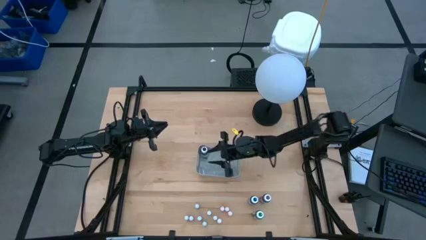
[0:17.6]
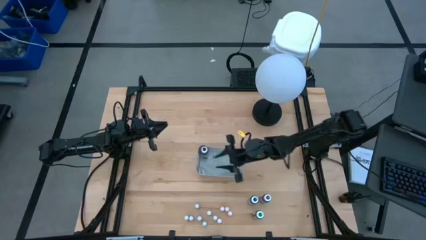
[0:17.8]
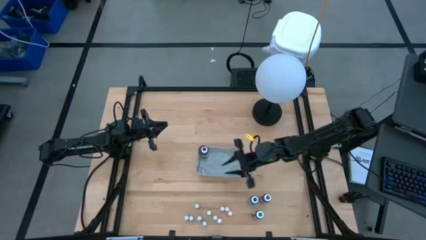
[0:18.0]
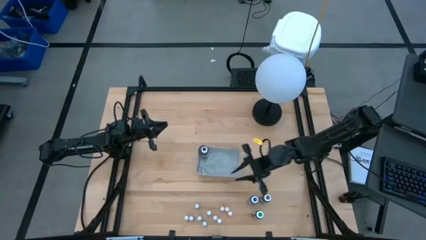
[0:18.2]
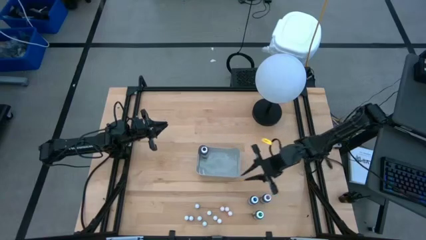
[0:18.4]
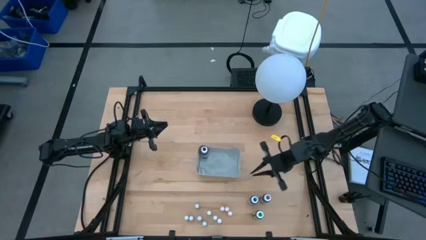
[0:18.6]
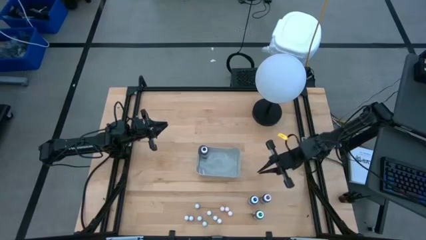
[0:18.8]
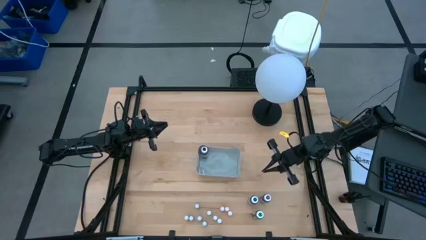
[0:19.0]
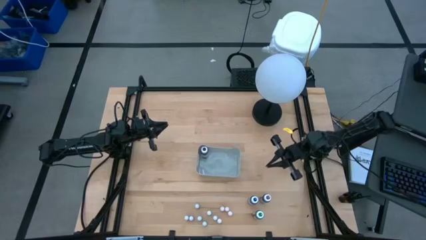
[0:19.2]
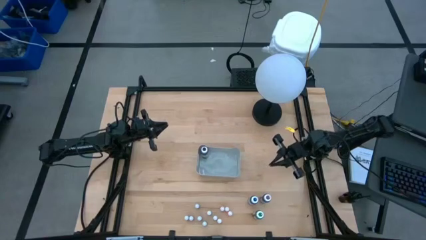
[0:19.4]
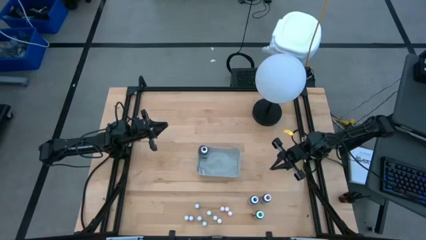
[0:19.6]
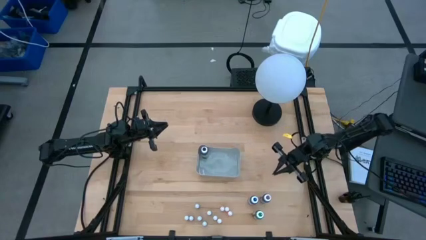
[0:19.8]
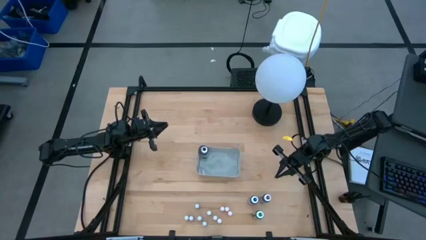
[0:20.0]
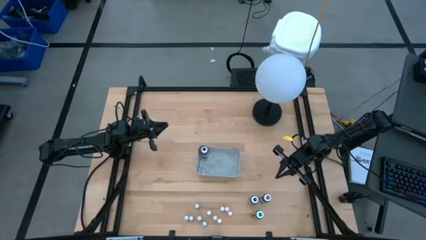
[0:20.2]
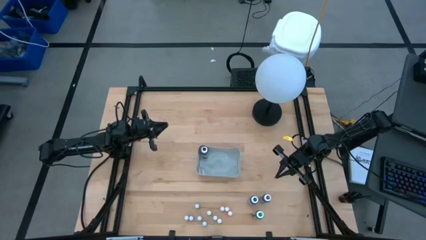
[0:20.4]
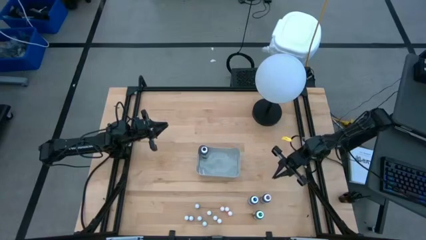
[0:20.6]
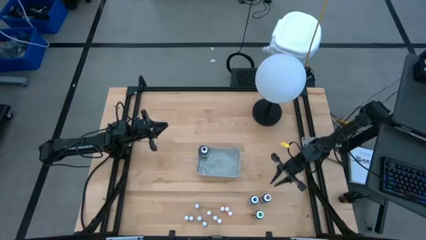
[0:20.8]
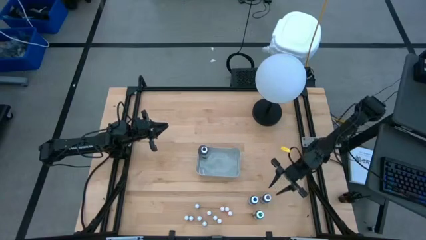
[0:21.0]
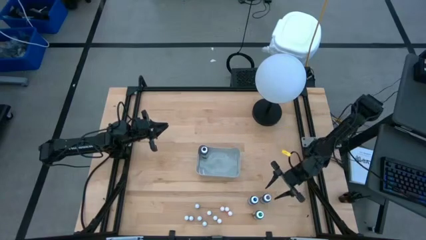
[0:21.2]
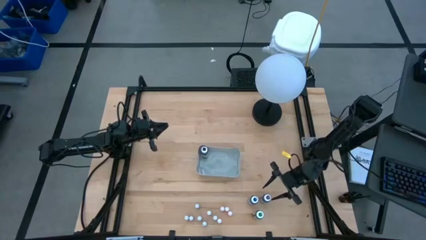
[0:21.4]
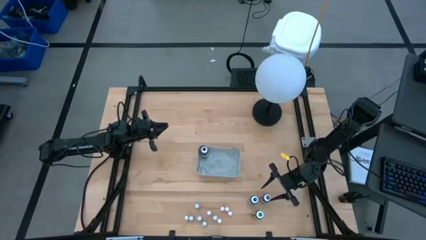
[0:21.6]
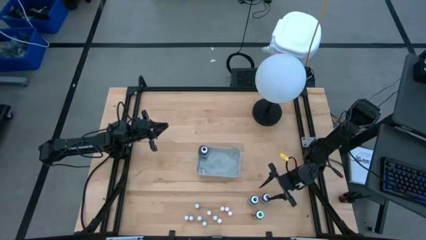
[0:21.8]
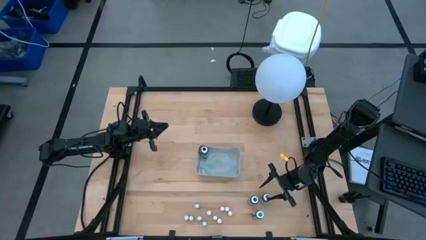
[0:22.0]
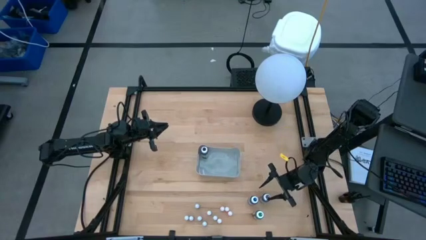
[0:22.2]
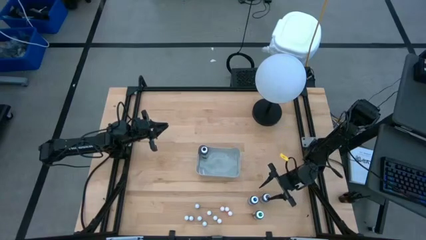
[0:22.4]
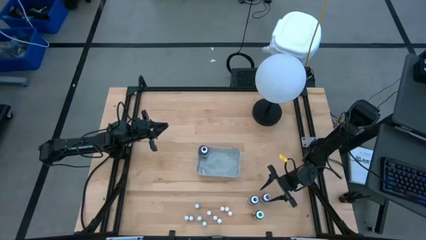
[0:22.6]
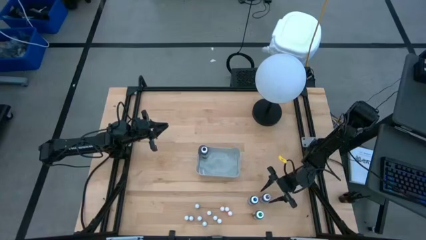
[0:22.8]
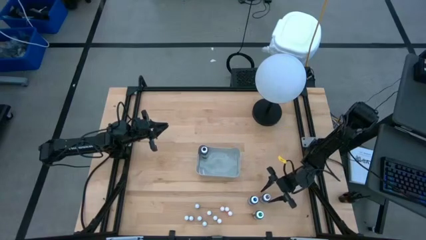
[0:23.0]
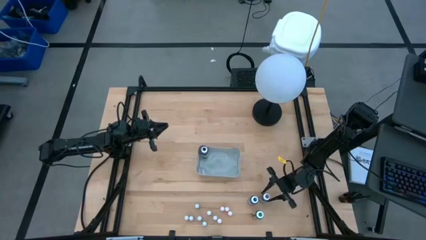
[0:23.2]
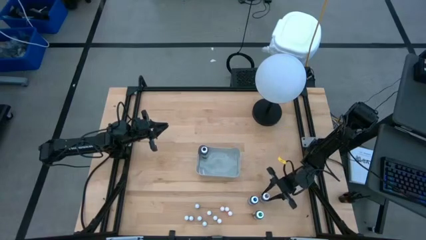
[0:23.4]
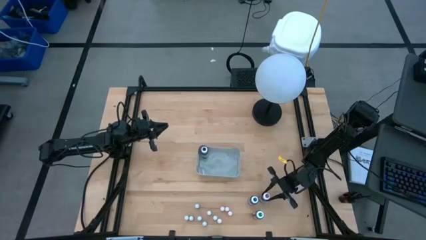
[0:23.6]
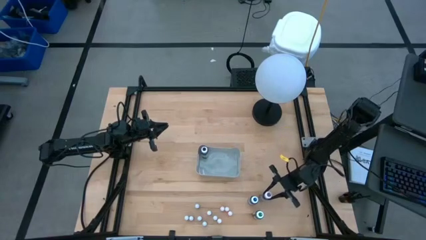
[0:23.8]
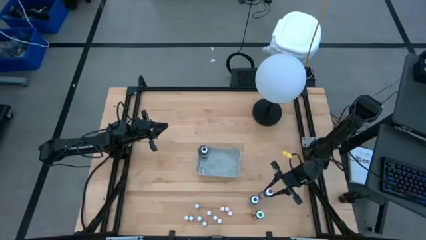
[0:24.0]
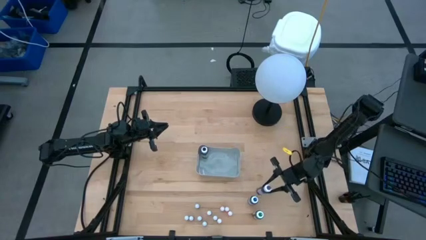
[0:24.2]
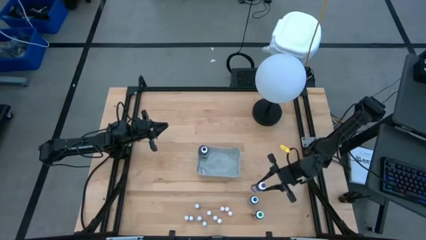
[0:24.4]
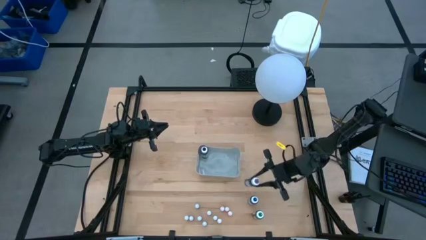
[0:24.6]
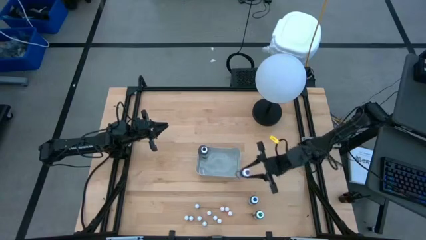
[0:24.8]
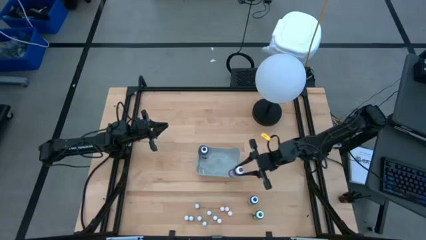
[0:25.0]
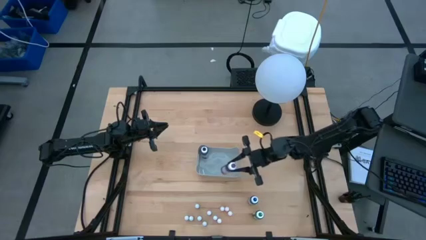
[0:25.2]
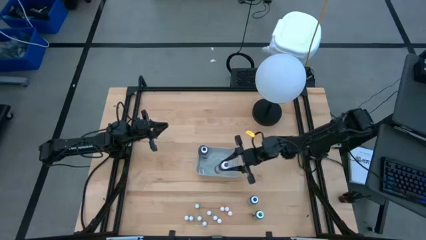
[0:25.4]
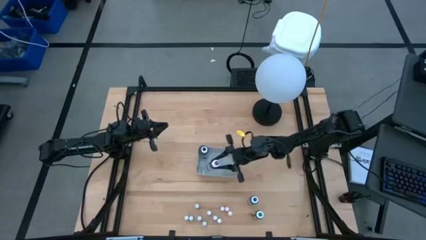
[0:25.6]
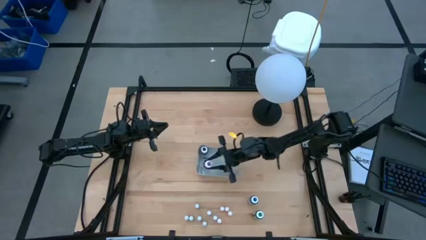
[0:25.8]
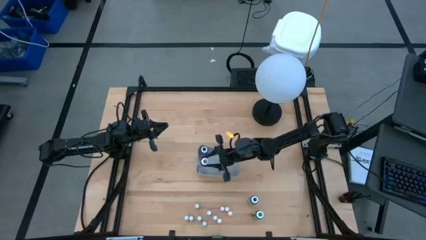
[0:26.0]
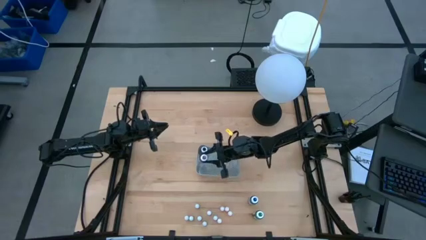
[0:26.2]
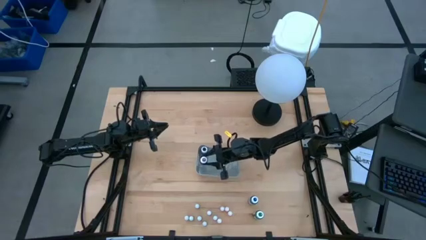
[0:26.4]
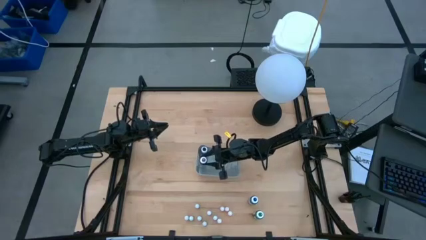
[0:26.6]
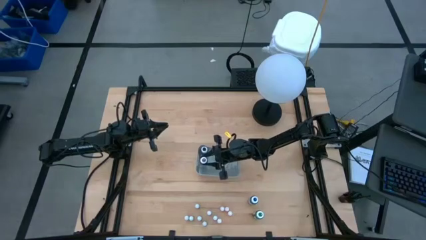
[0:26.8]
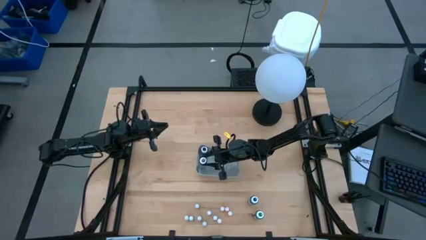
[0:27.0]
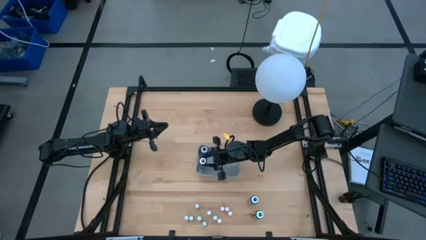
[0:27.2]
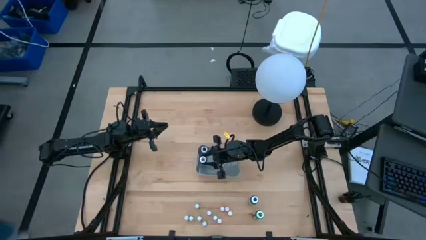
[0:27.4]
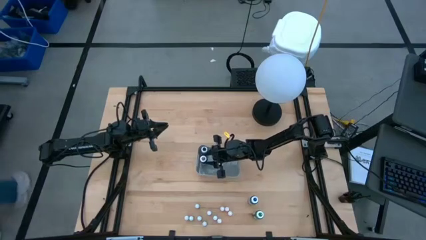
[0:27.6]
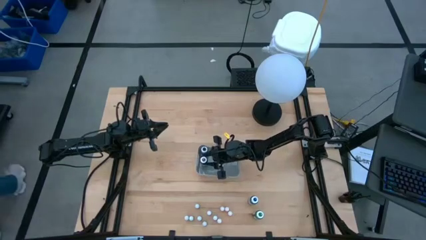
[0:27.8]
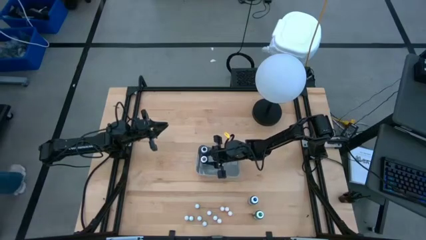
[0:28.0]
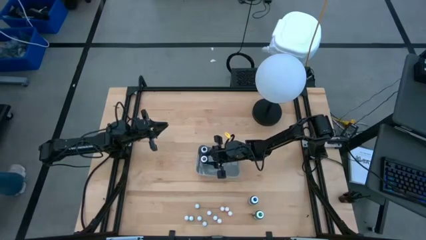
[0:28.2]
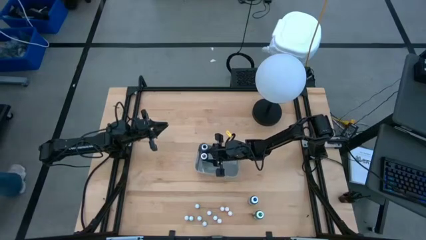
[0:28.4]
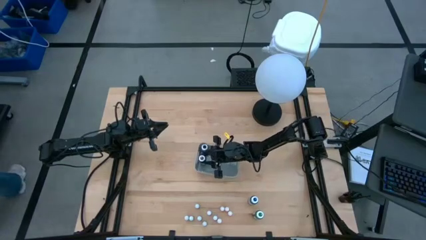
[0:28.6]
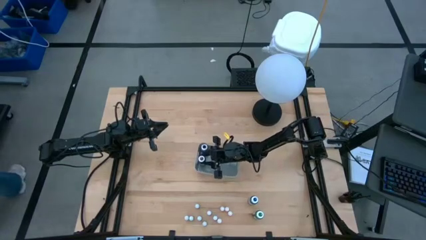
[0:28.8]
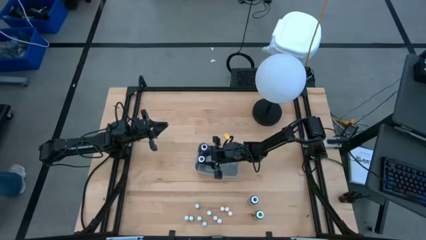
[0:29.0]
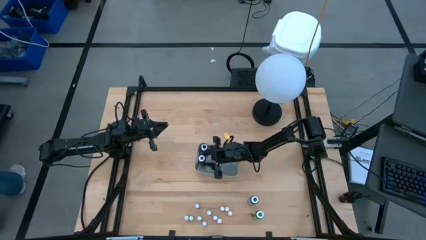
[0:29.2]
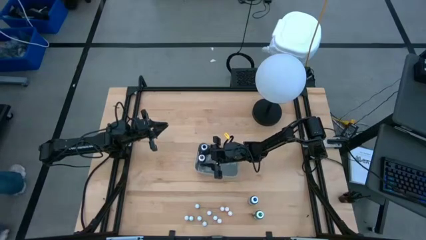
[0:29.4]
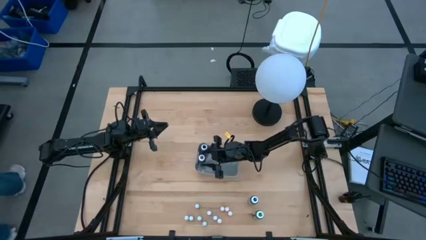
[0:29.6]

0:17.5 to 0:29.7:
Task: Pick & Place food coloring
Put the large purple food coloring bottle into the gray bin

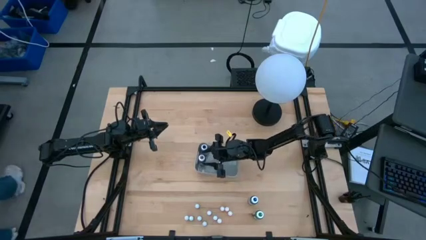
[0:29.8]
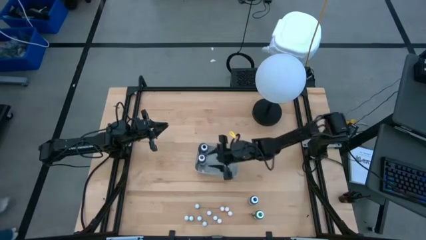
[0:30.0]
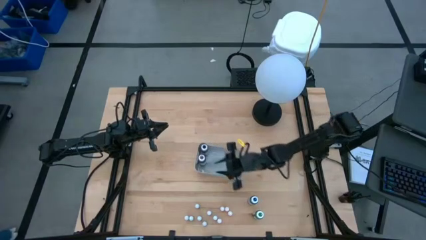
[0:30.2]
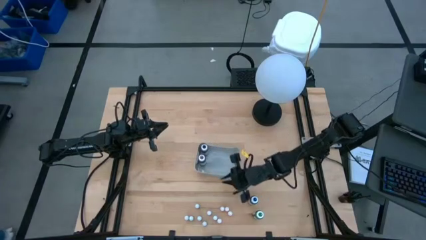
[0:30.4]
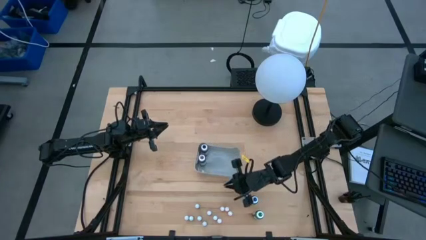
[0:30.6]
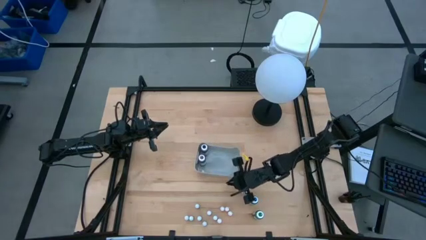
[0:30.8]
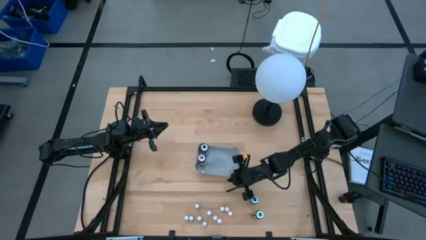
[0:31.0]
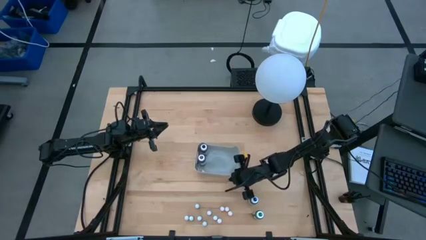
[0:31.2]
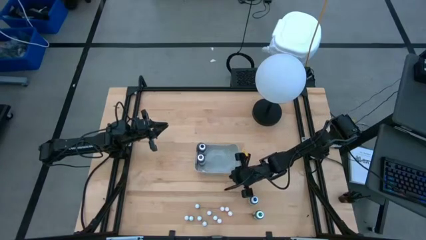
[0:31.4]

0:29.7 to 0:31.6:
Adjust the gray bin
